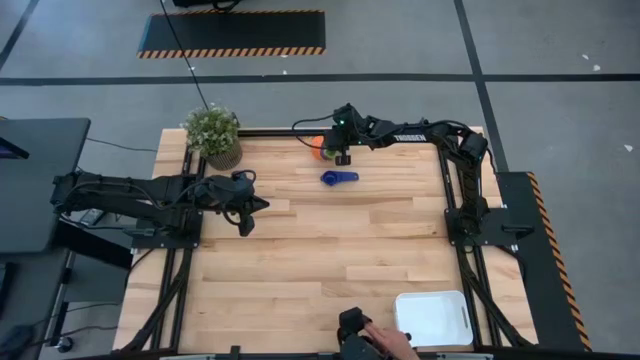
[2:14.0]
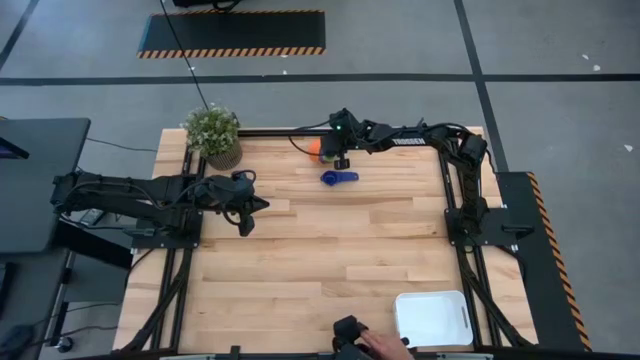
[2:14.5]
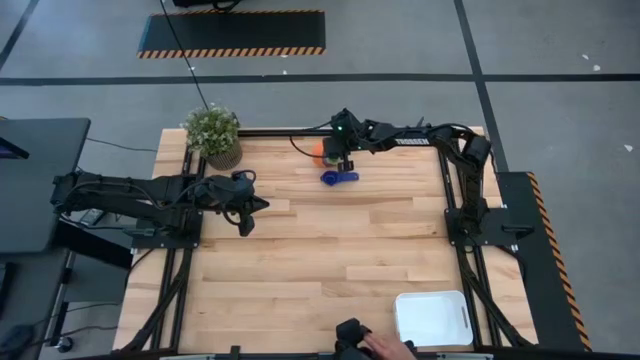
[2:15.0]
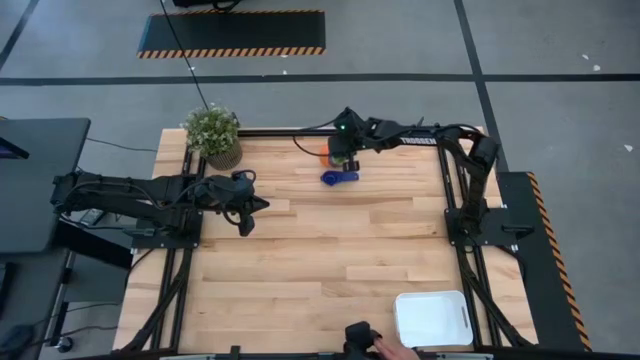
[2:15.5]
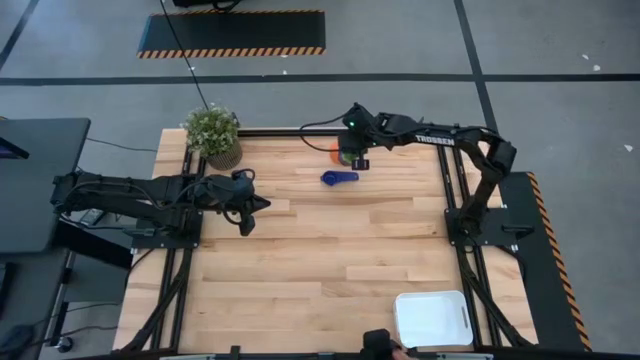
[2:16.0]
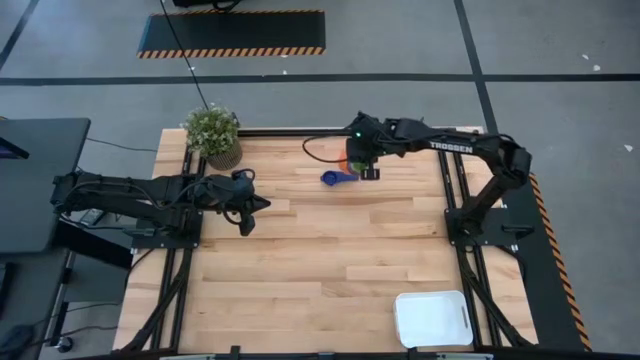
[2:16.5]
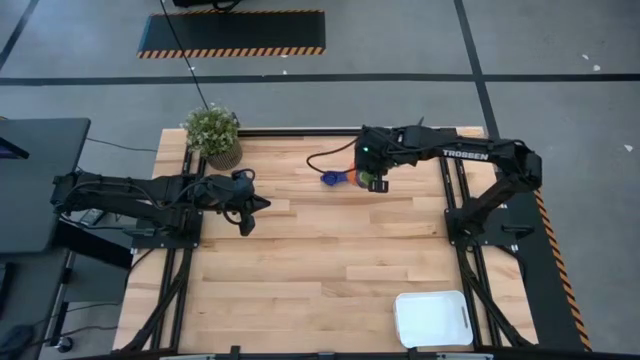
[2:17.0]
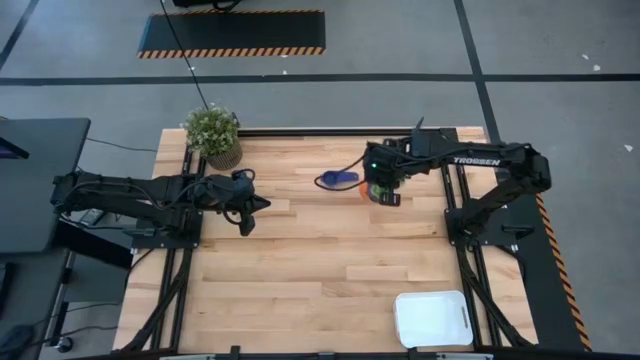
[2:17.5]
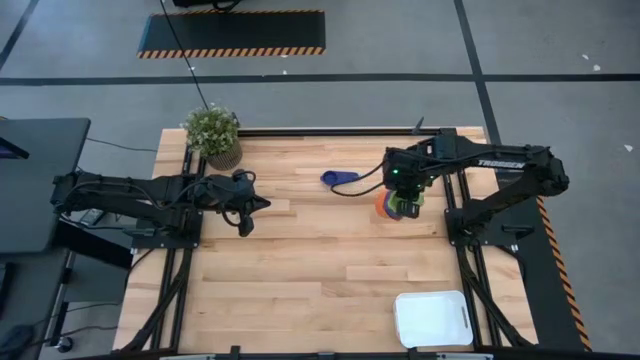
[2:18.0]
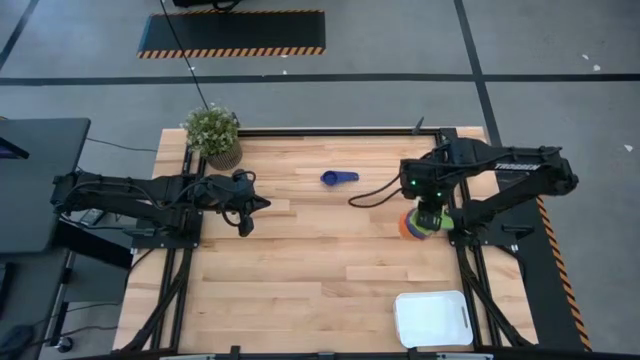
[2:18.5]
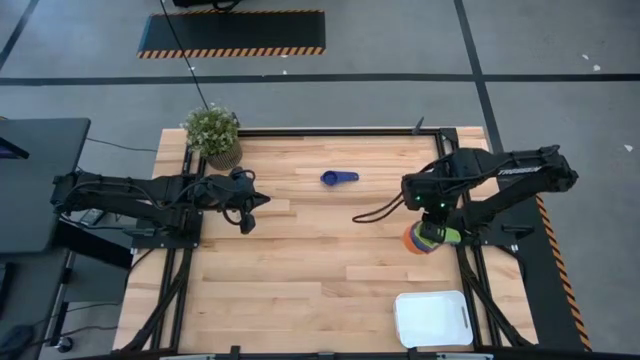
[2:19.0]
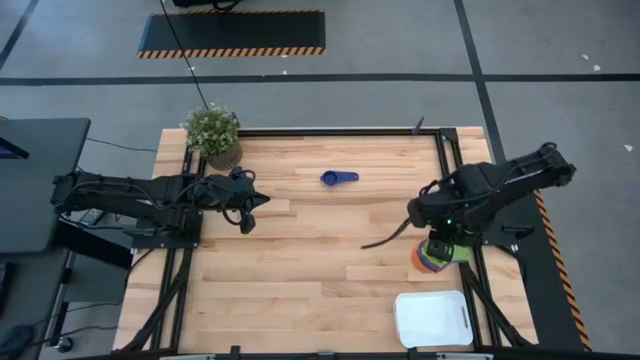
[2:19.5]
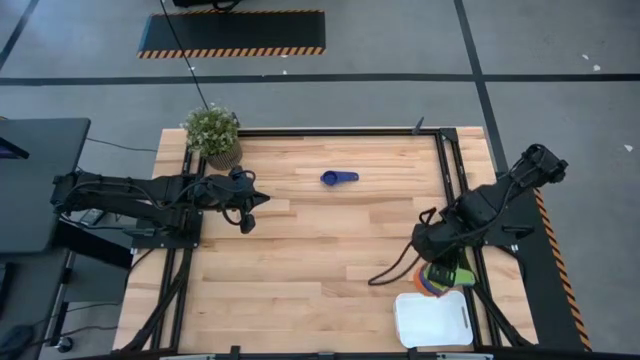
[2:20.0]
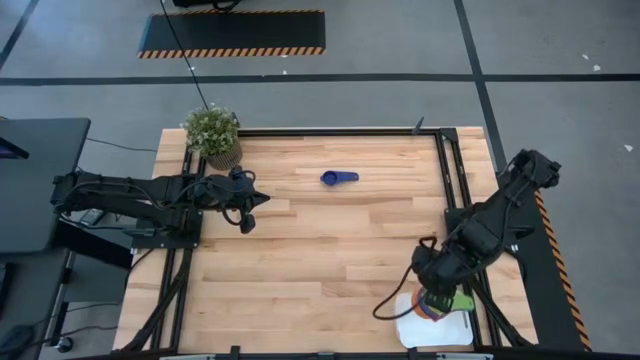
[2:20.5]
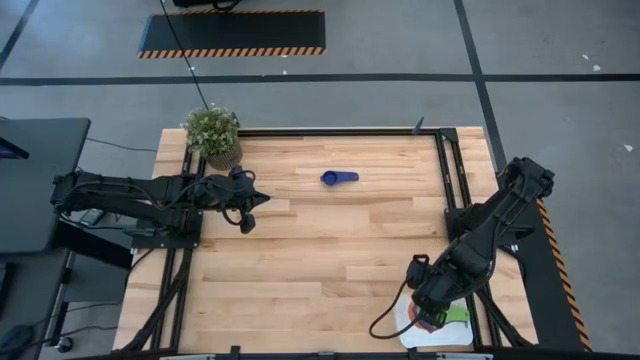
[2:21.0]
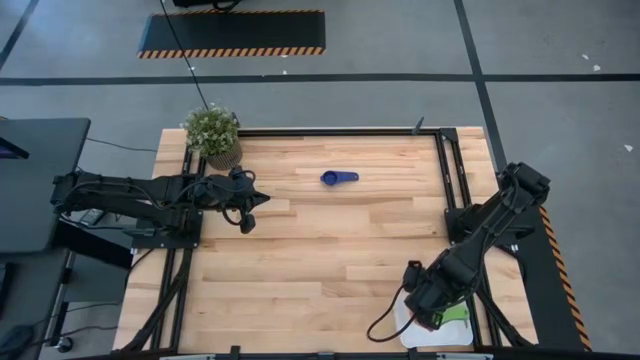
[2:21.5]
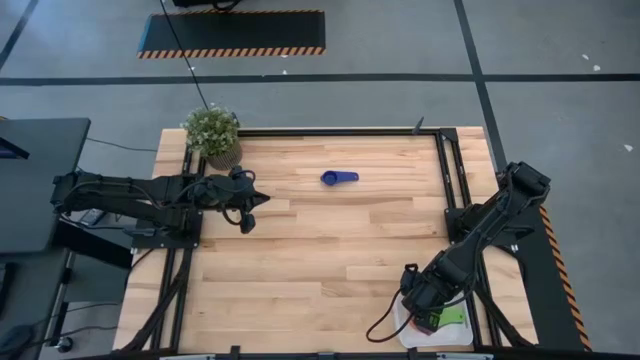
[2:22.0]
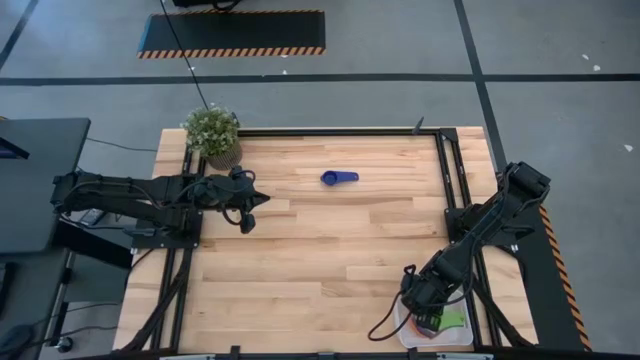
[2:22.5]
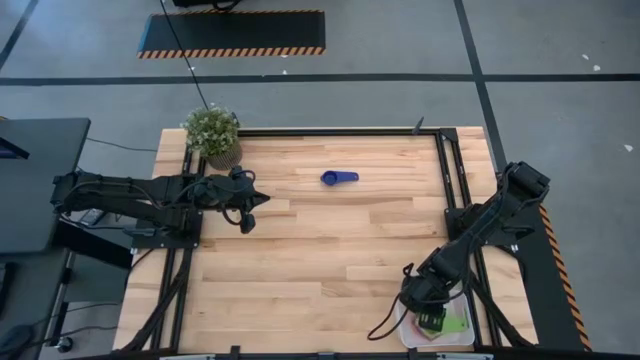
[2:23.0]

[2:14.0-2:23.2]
Task: Nest measuring cups in basket
Put the stacked measuring cups into the white bin

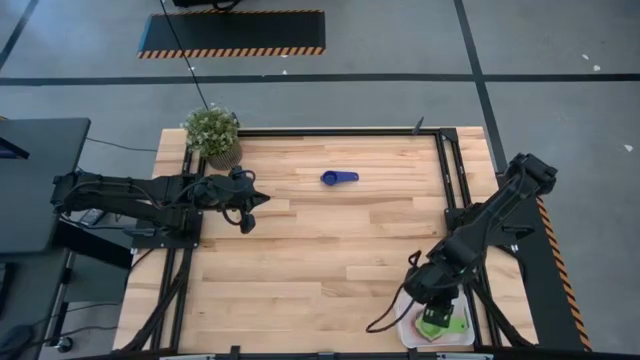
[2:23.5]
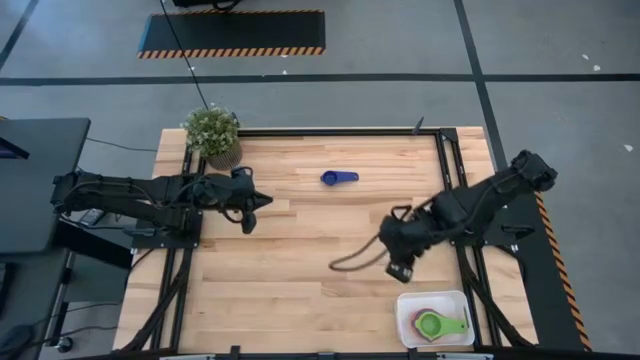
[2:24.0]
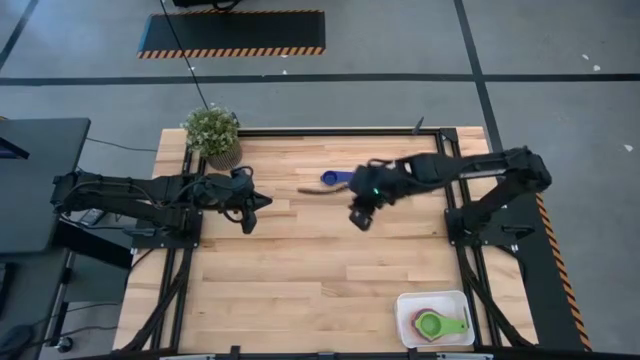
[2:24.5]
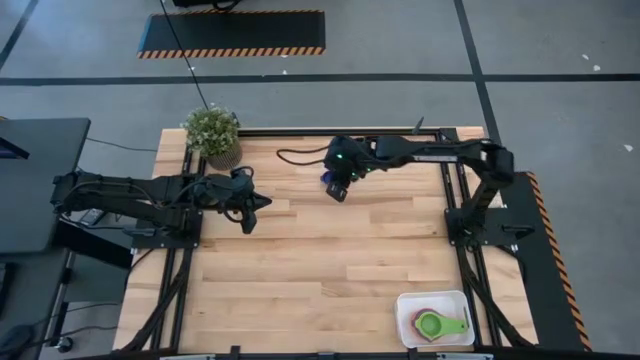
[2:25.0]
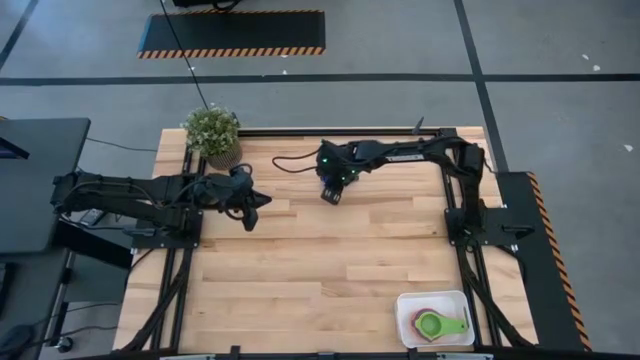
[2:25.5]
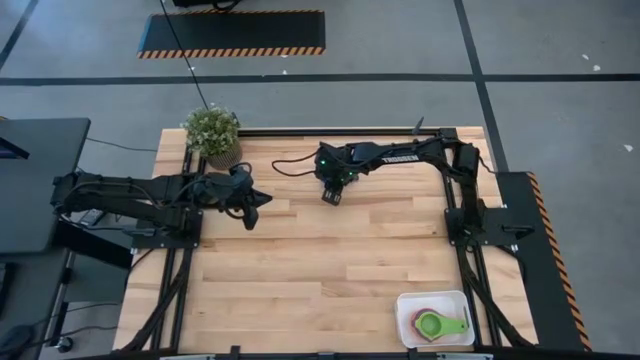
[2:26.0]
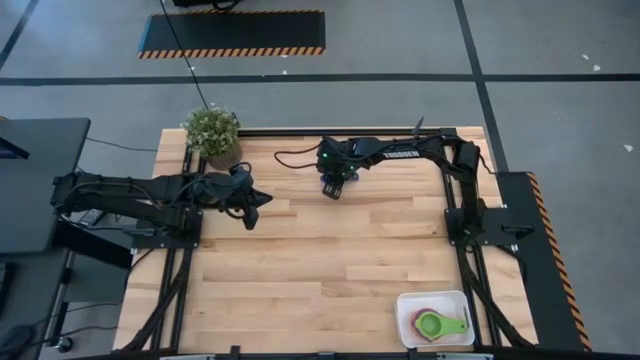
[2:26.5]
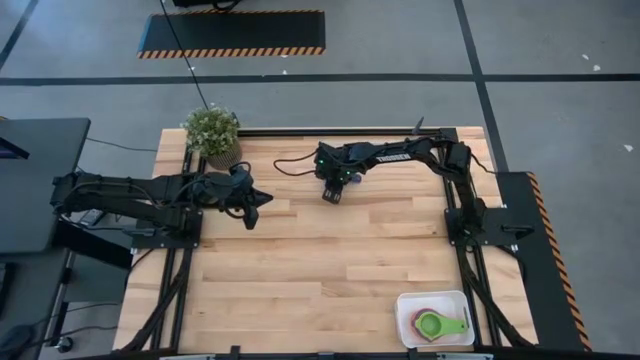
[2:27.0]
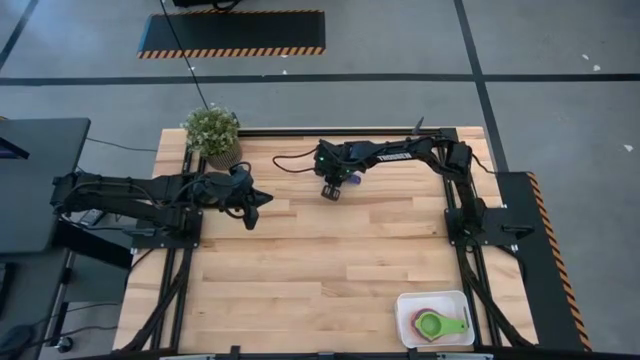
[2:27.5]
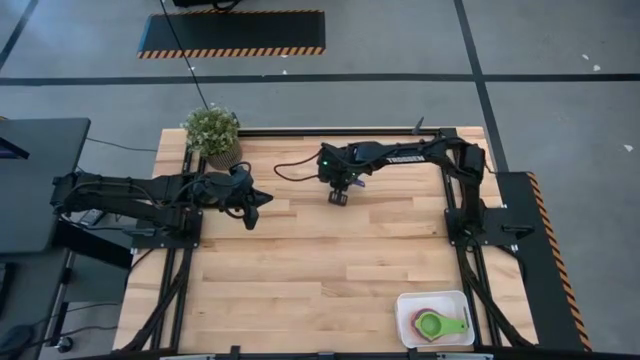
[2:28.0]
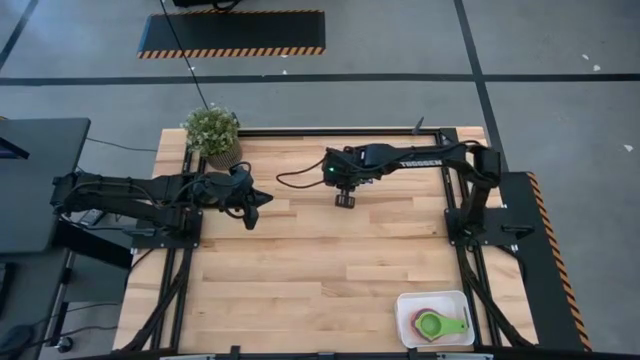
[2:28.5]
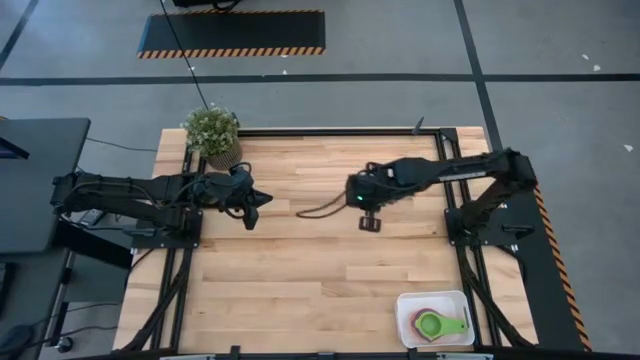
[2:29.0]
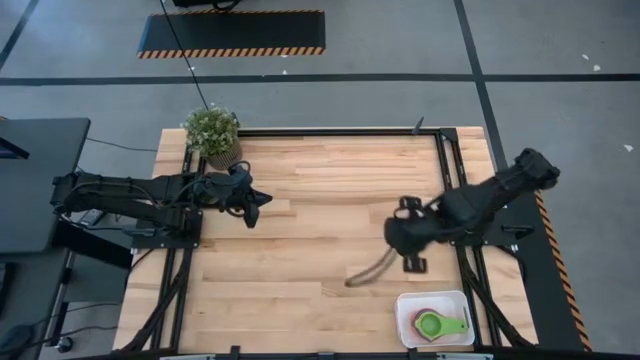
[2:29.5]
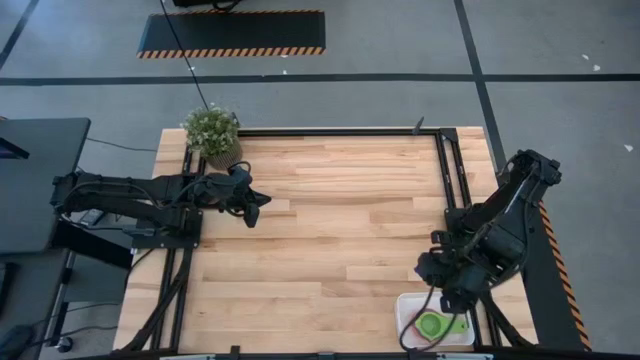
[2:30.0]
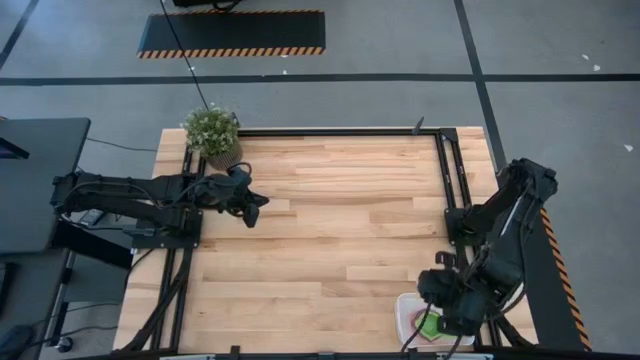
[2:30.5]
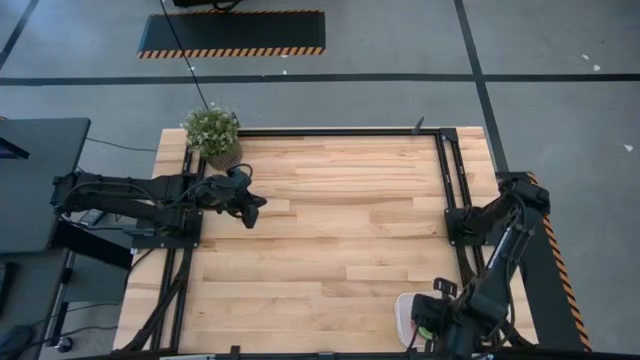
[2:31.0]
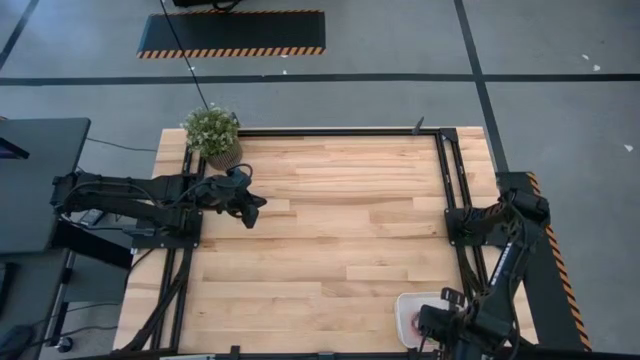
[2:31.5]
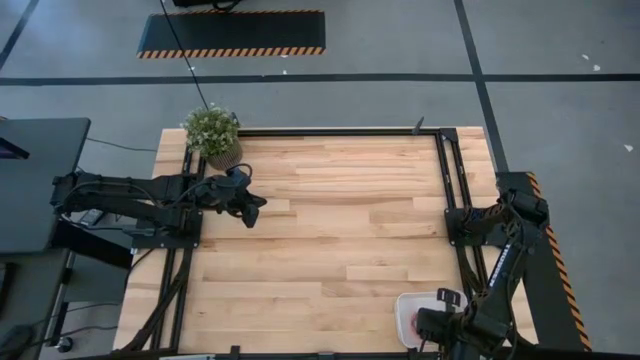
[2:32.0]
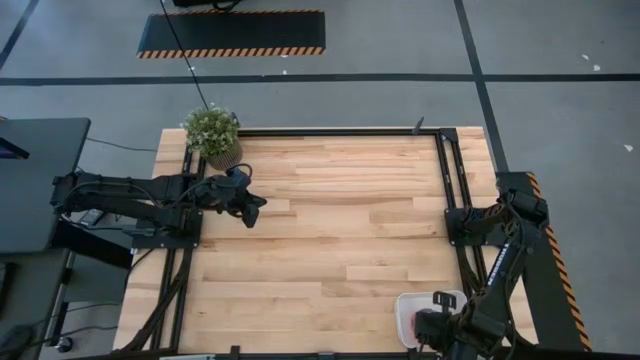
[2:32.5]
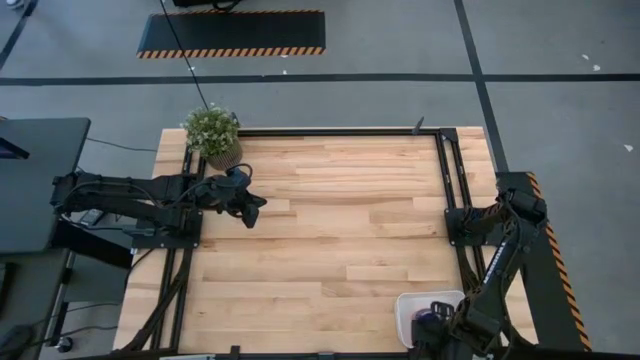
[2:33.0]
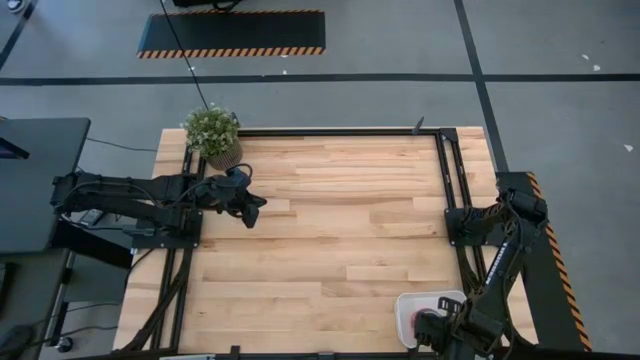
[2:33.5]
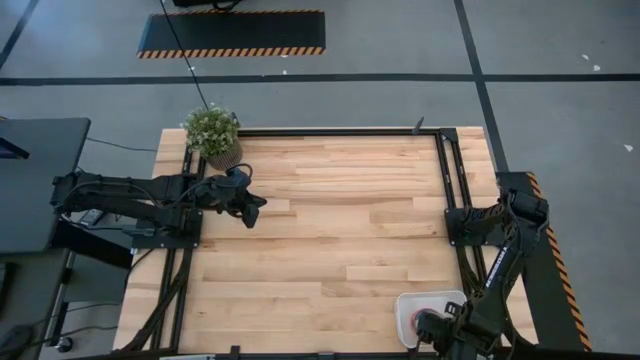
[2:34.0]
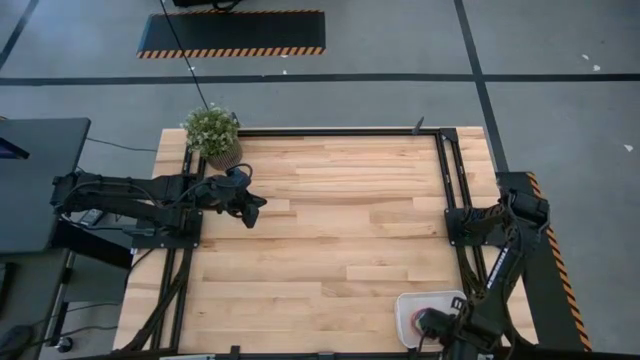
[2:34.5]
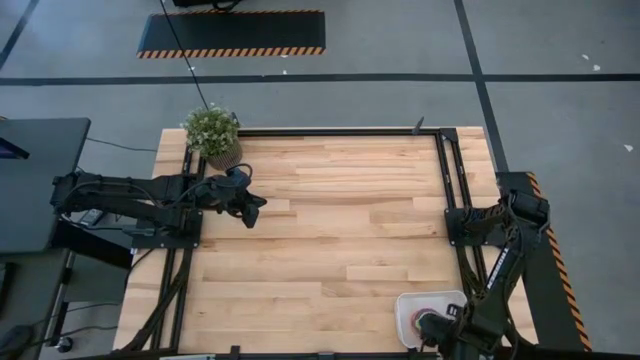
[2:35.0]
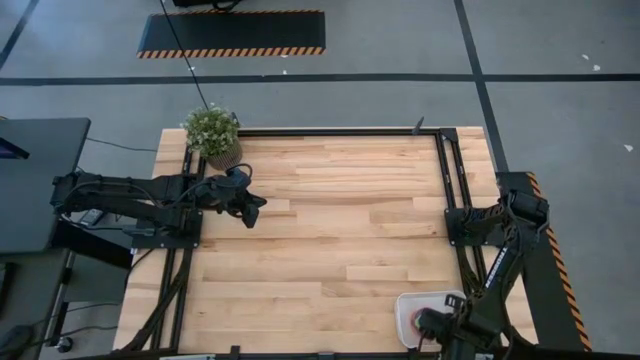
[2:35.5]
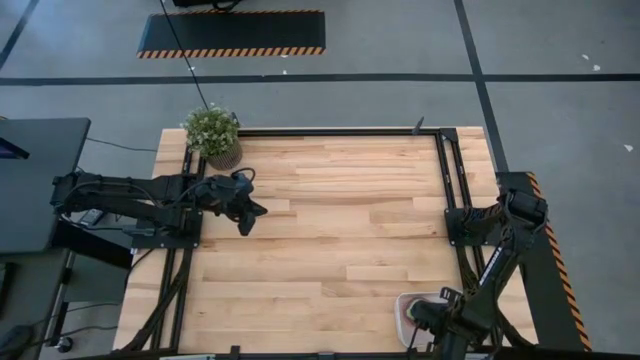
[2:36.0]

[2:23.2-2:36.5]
Stack the dark blue measuring cup on top of the green measuring cup and put them into the white bin
